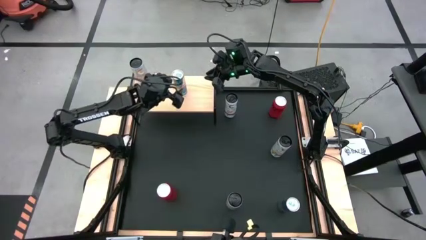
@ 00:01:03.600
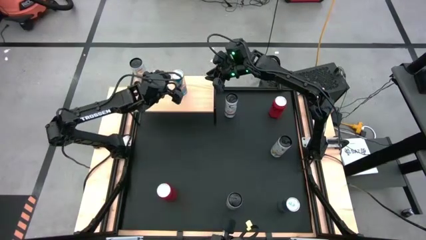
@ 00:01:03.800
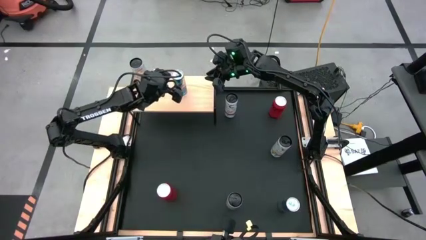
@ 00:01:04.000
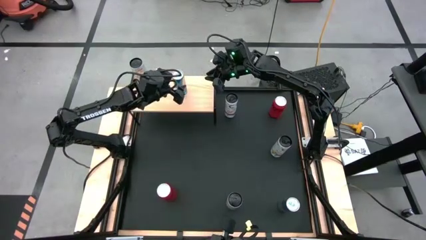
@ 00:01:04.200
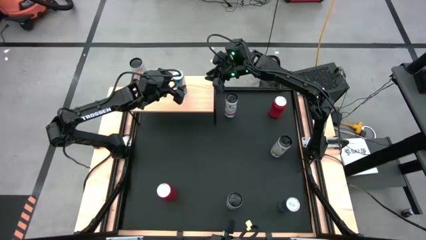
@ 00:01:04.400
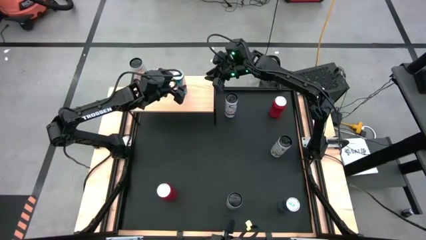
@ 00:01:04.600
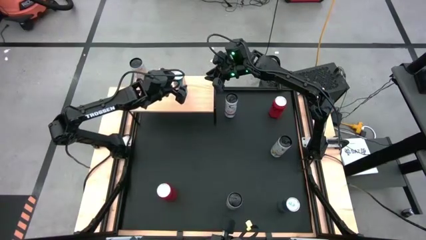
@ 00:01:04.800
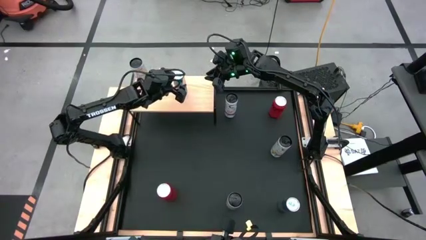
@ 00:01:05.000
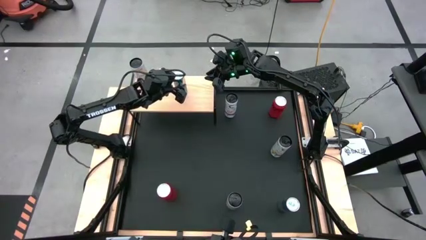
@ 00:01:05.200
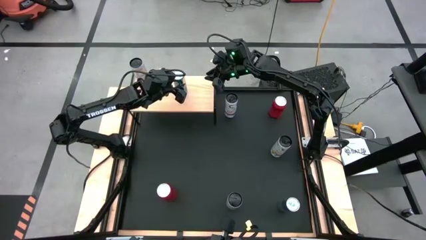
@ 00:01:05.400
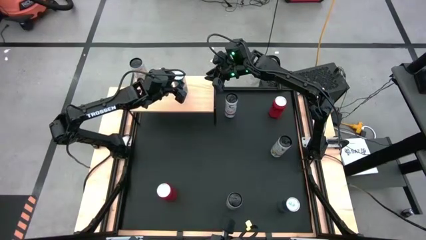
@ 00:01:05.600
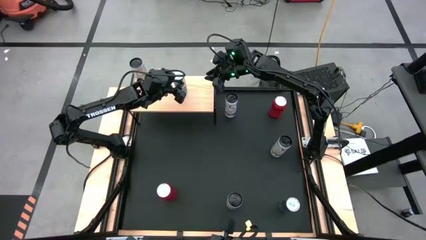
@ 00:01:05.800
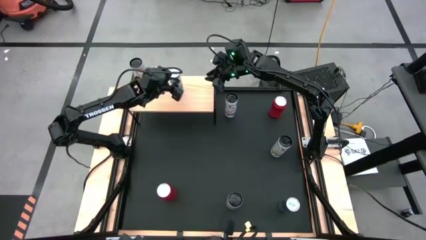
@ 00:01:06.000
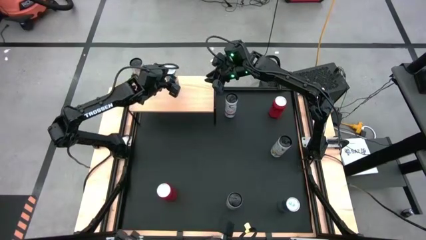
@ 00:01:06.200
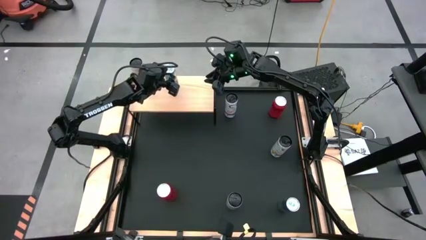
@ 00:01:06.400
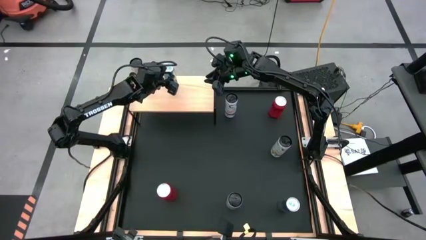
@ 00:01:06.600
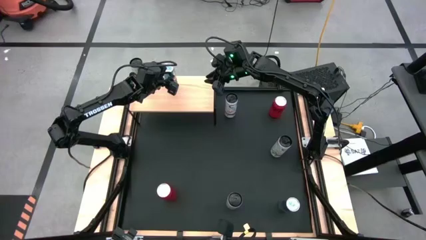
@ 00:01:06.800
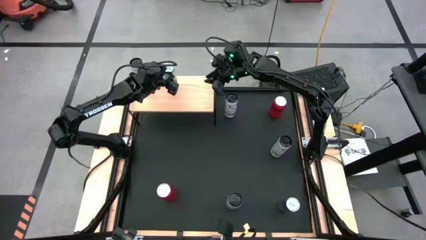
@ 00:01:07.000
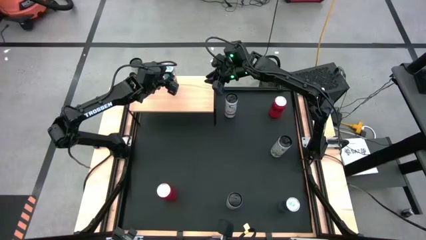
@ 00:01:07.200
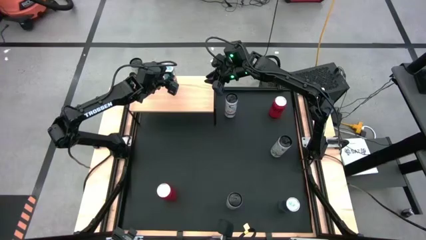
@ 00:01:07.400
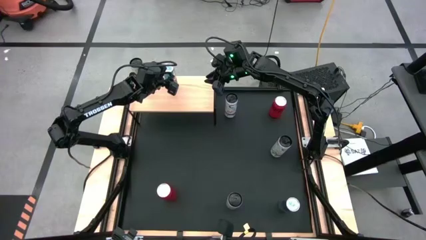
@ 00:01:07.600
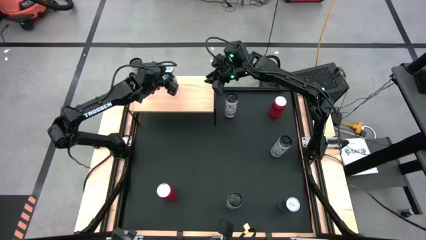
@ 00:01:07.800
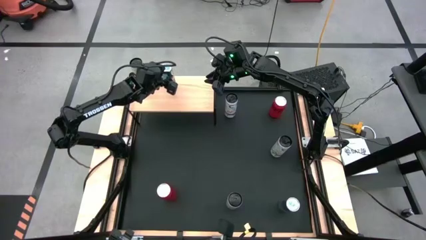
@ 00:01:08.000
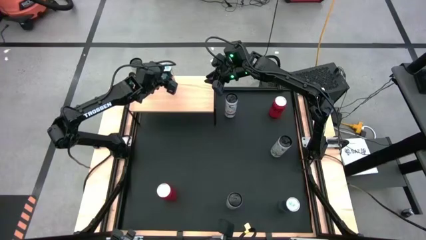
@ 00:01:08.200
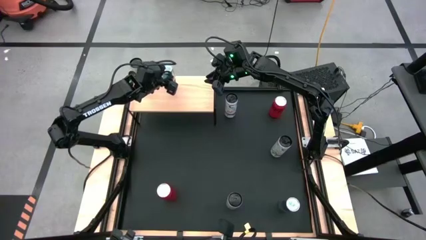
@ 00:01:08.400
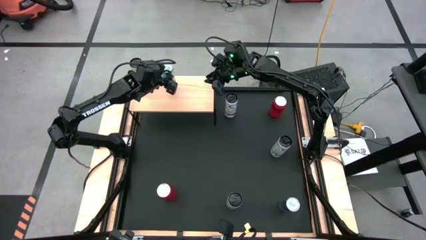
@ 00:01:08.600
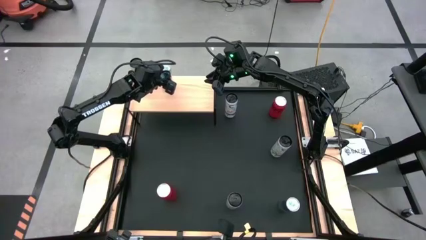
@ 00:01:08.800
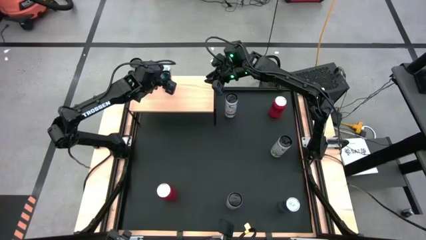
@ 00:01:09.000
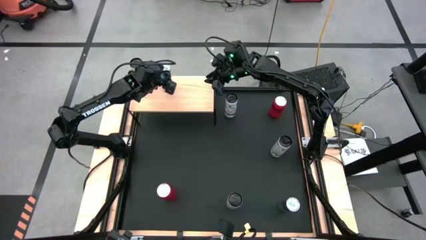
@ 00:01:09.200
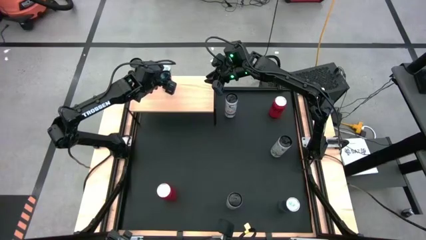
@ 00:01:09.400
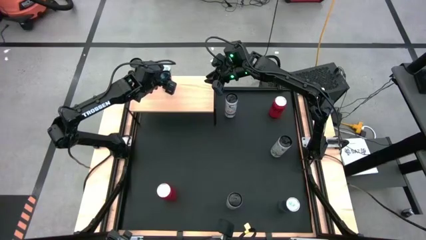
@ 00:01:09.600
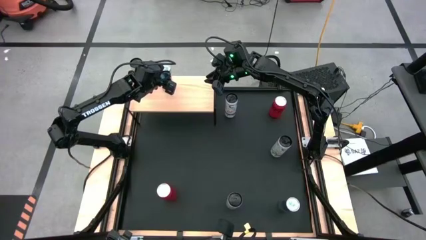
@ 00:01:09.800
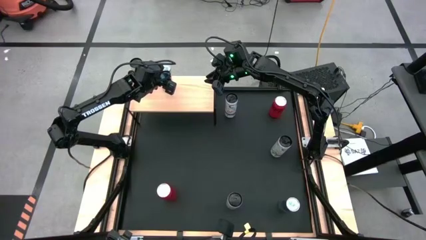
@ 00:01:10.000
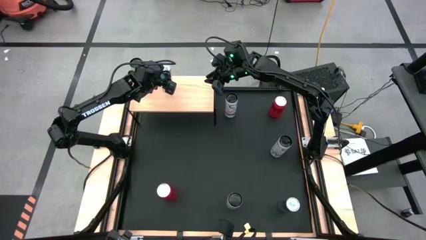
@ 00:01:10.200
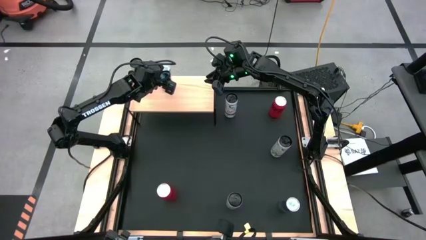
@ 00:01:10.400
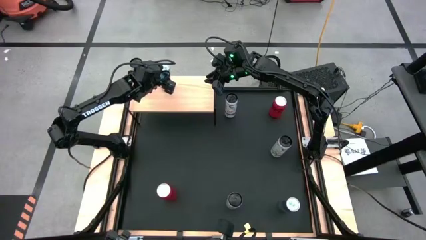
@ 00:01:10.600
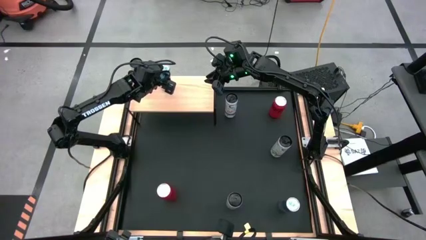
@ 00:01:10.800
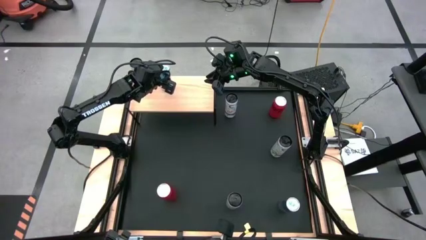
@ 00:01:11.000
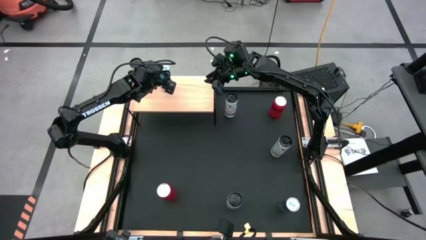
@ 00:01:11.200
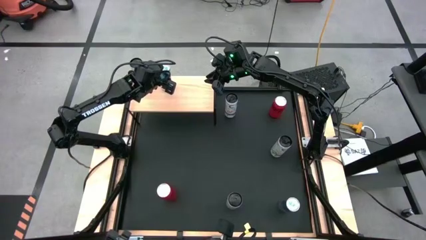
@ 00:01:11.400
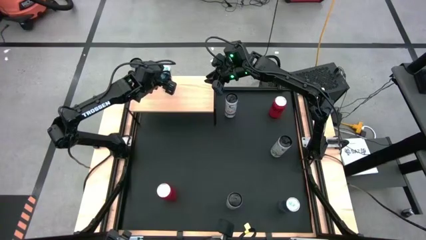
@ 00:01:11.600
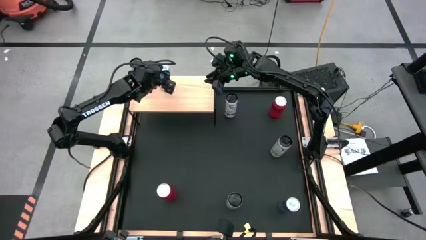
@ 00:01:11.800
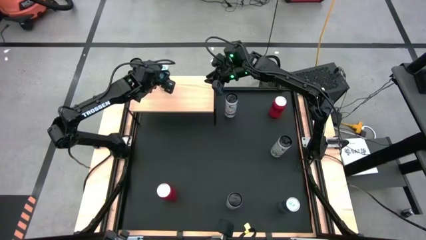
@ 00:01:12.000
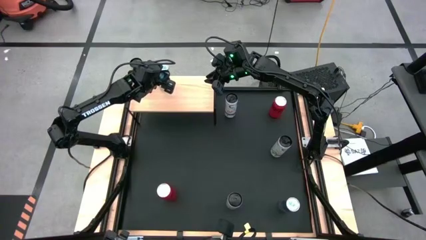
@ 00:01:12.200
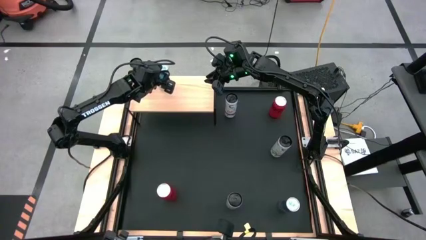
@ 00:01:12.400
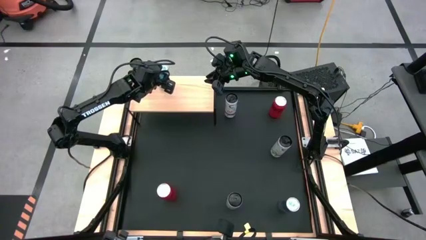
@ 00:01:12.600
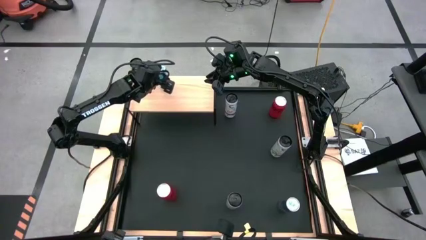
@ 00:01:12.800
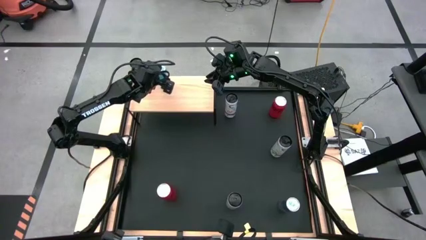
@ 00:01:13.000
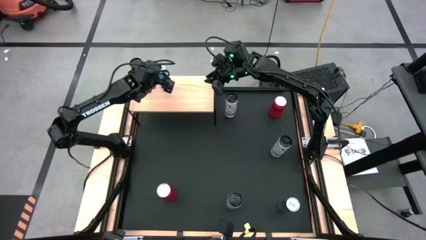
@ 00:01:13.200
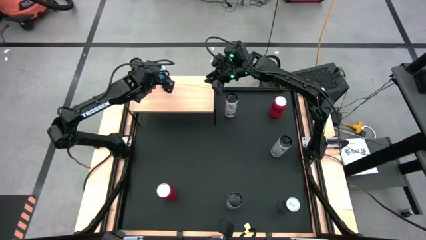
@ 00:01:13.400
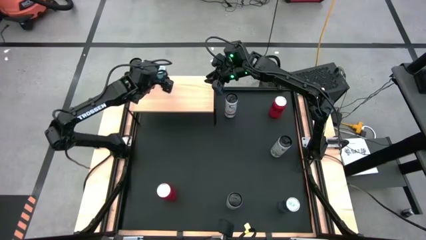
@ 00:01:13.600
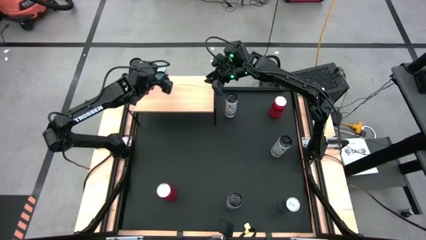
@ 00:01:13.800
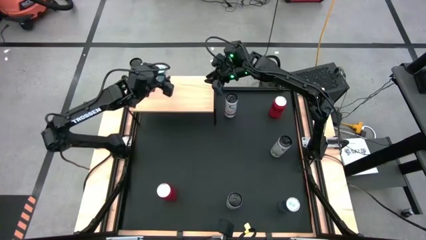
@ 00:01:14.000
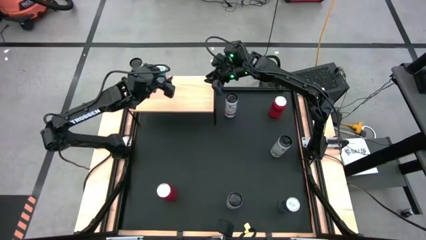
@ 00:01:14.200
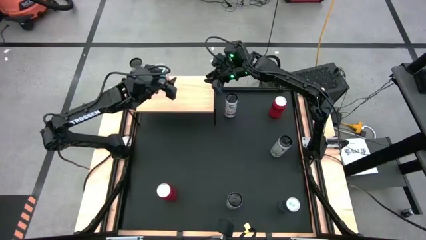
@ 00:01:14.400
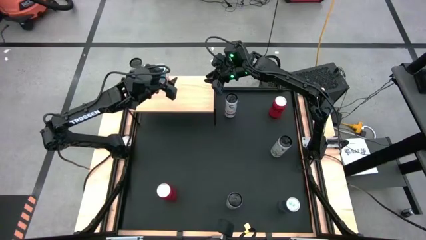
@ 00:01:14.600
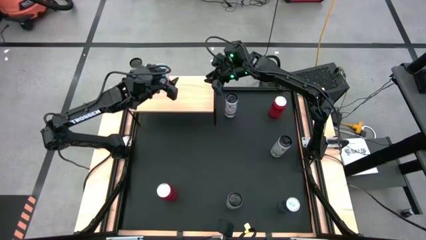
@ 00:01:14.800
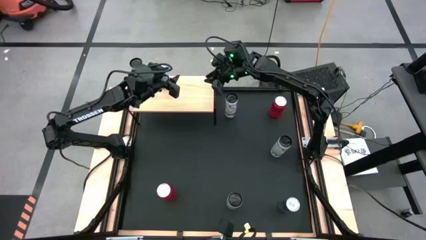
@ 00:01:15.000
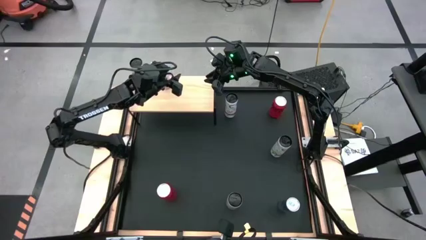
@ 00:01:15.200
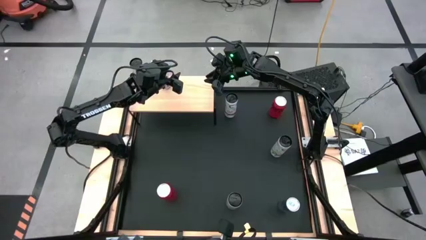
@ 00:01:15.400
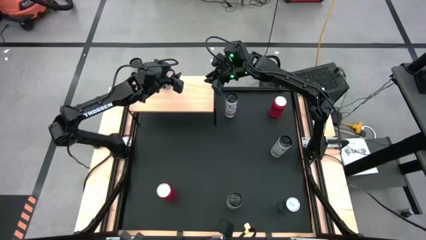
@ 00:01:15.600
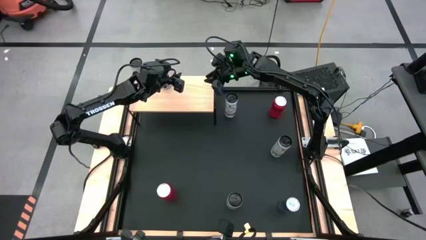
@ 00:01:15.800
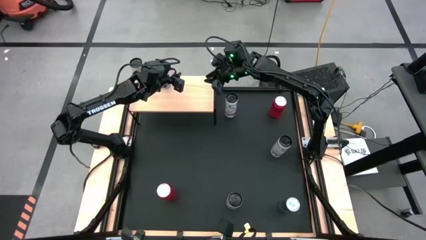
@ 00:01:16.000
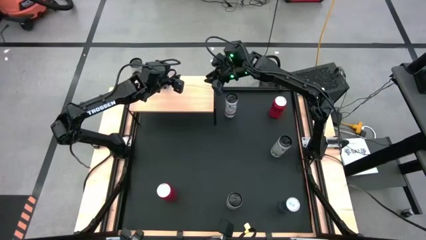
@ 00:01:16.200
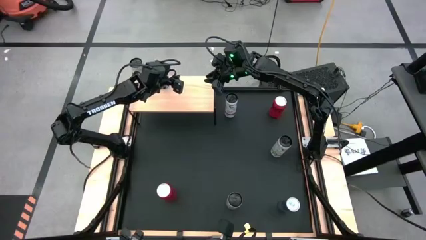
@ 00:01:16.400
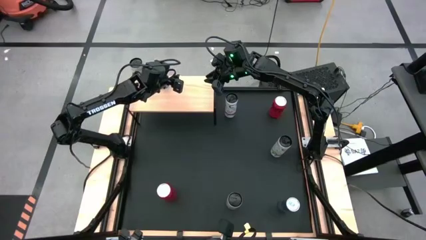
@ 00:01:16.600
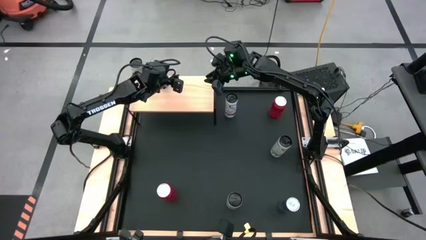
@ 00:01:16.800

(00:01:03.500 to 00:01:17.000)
Task: Place canned beverage on shelf
Put the top blue soda can on the shelf

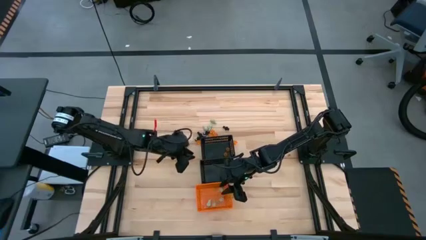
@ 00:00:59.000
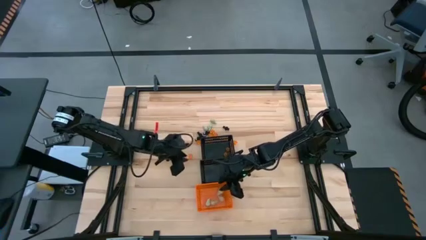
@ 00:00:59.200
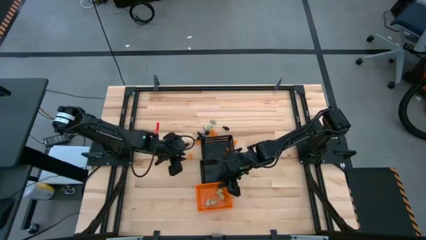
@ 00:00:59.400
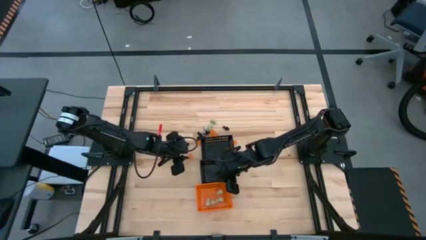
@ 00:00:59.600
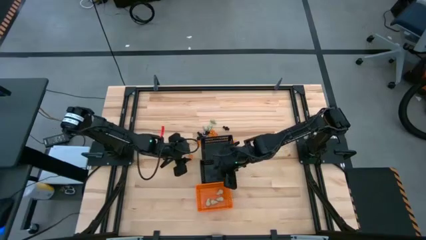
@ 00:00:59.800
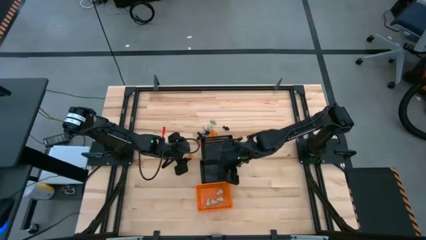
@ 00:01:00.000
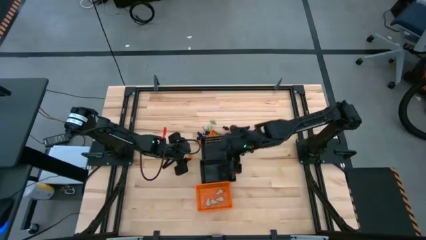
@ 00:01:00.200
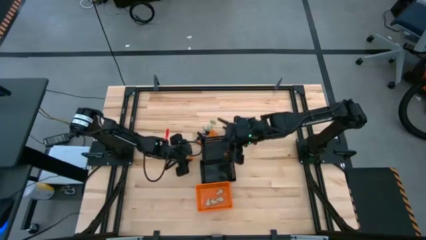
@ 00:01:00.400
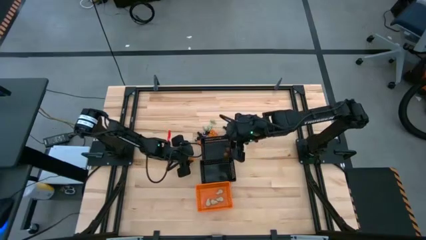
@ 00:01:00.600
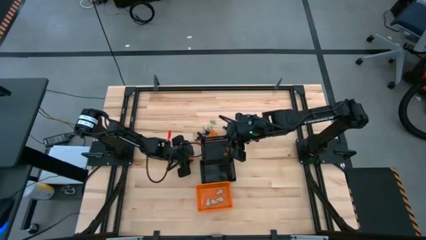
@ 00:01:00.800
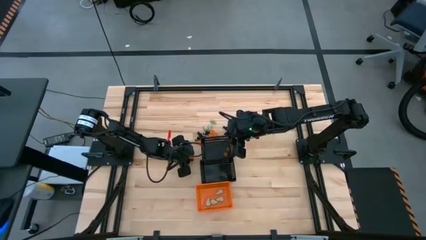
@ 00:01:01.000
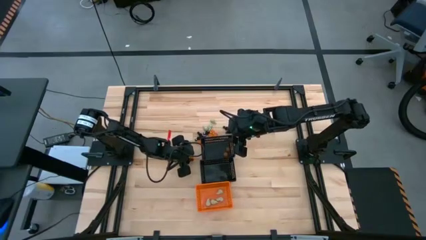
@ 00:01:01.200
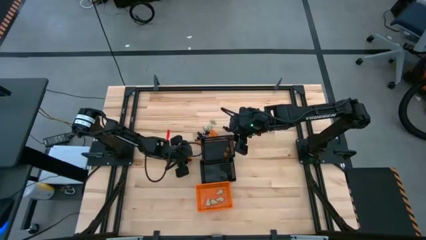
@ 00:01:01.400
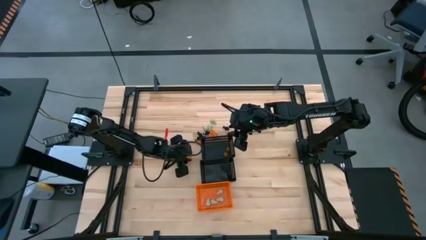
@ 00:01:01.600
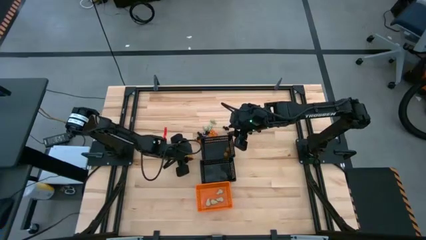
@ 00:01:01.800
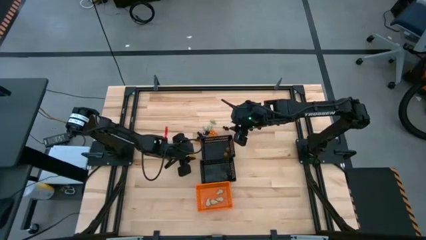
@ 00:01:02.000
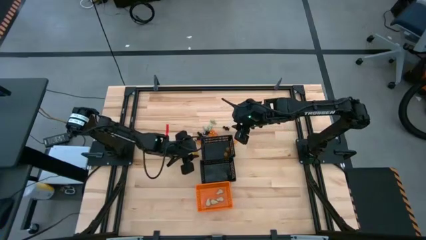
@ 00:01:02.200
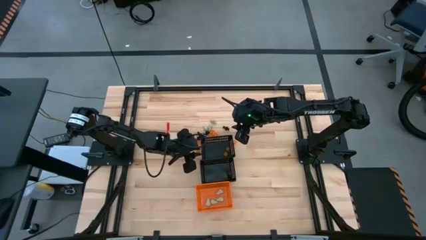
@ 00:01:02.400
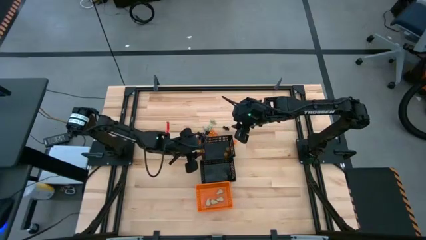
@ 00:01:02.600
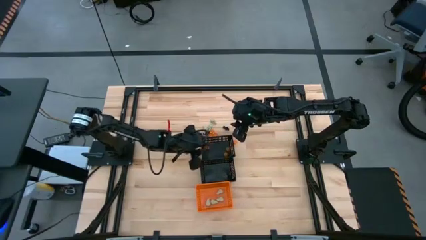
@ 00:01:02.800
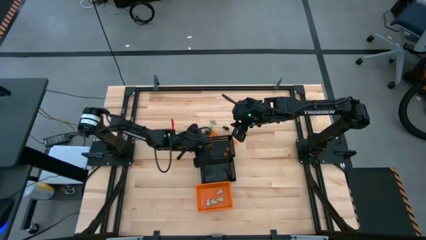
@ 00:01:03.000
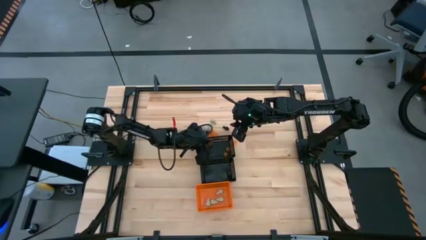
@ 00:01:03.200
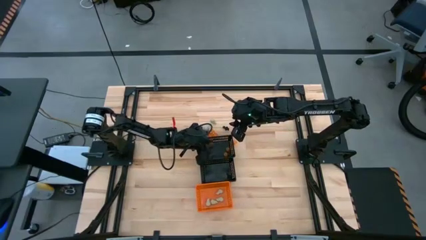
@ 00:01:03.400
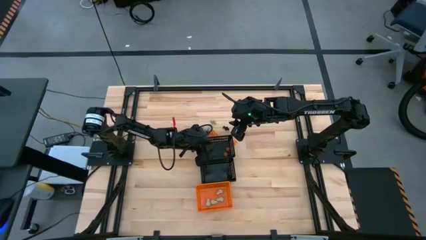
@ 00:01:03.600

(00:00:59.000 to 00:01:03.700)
Task: Sort Halloween decoration
Put the orange pumpkin toy into the top black bin
